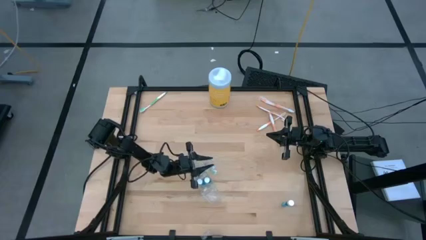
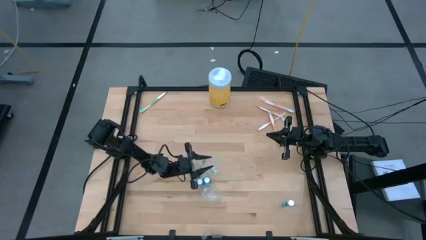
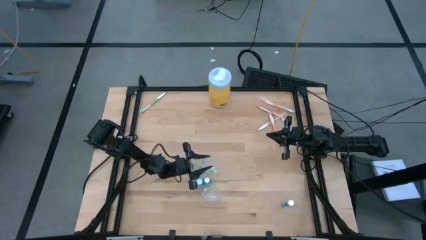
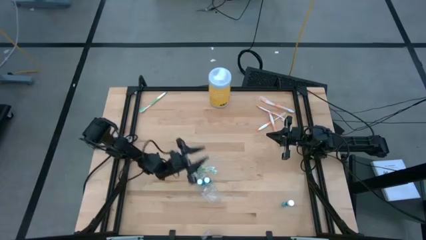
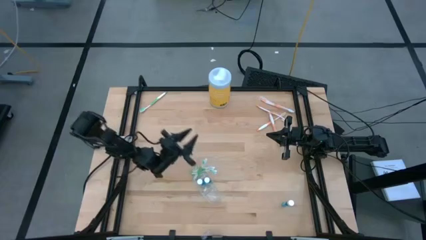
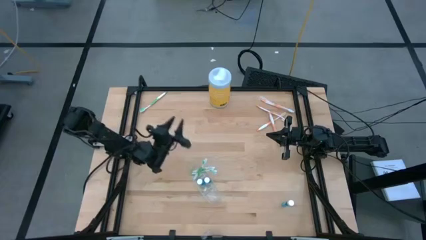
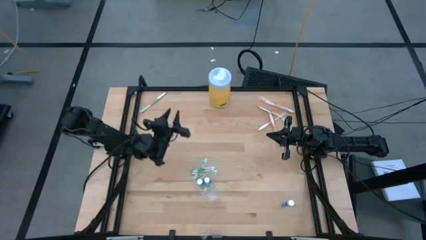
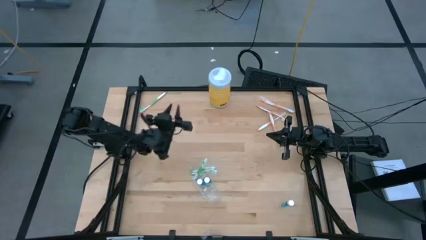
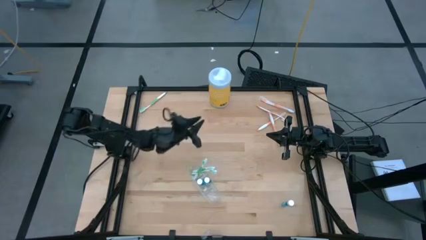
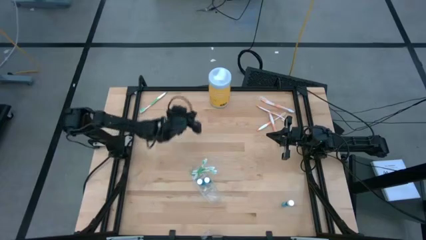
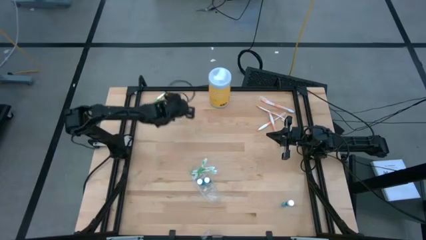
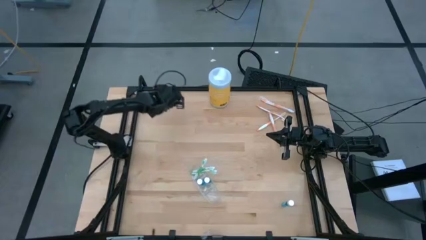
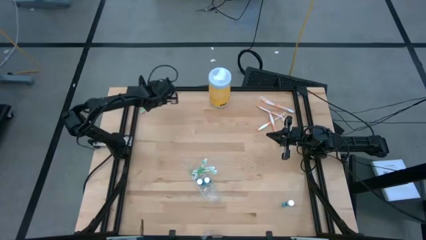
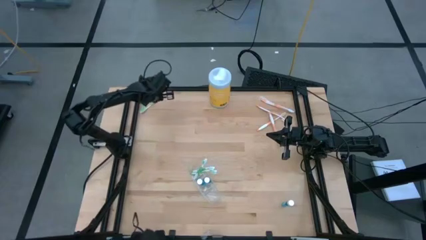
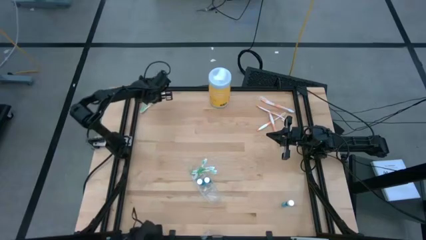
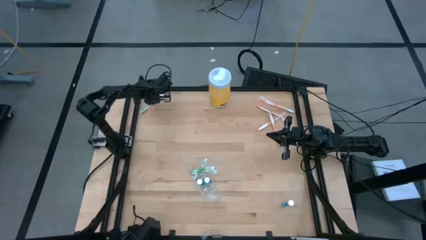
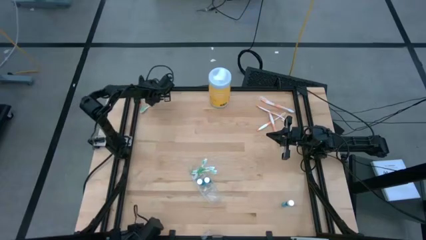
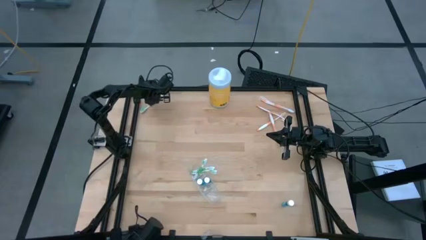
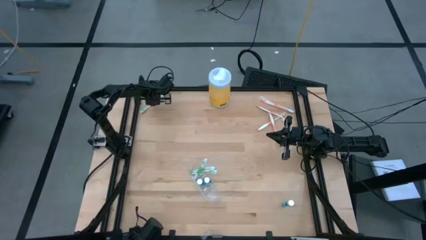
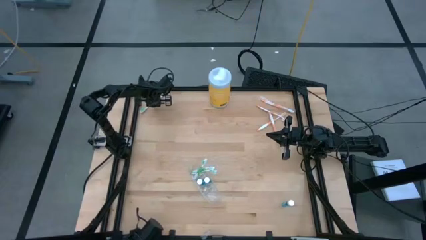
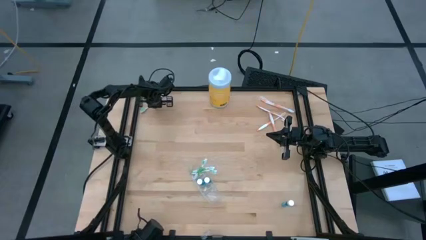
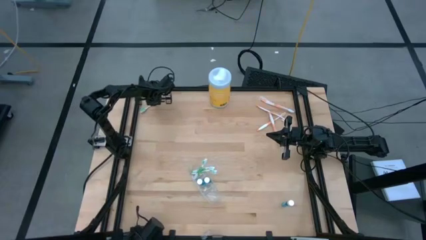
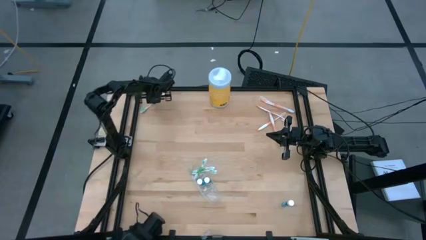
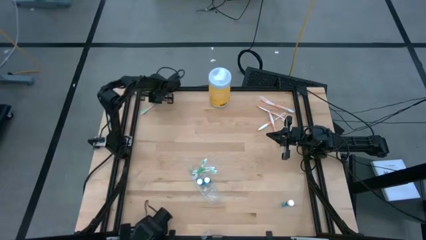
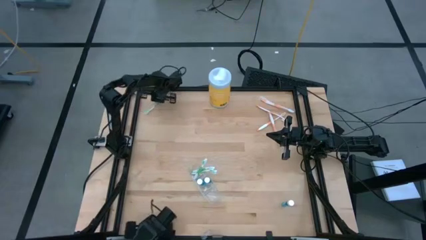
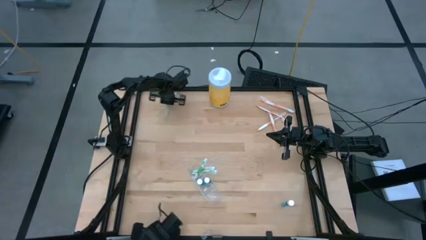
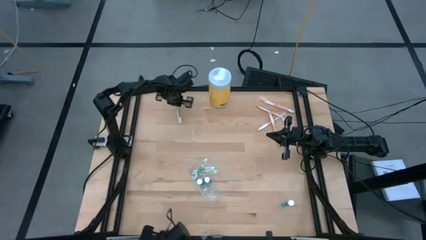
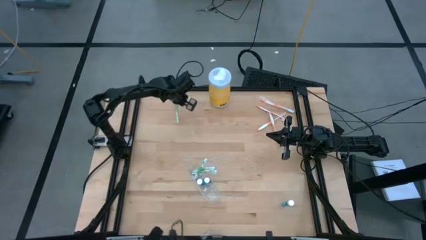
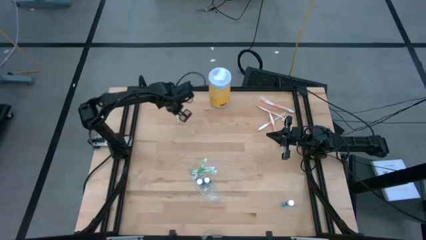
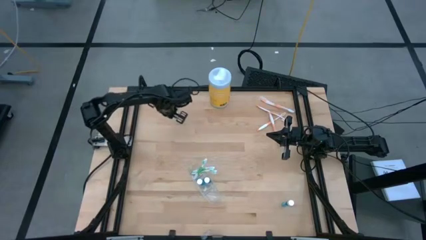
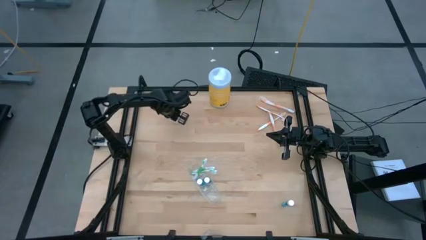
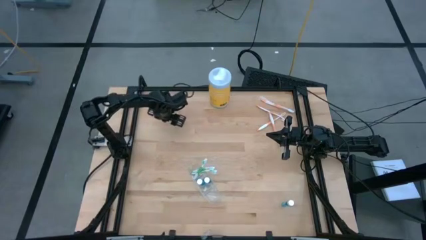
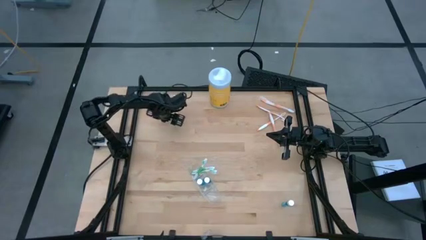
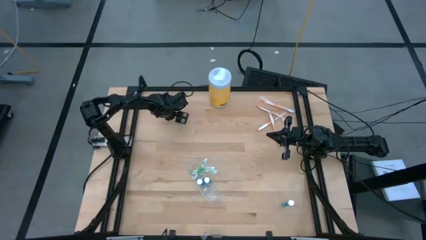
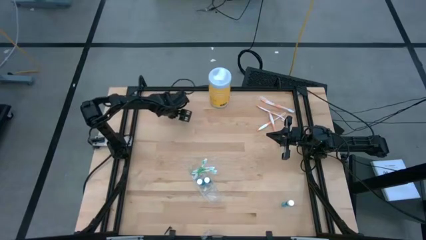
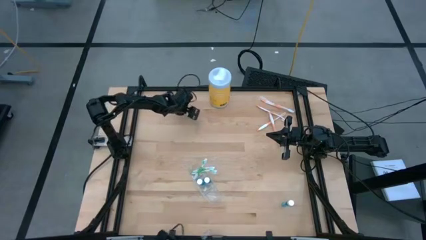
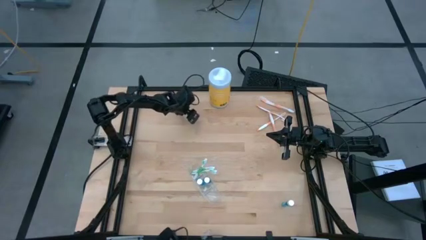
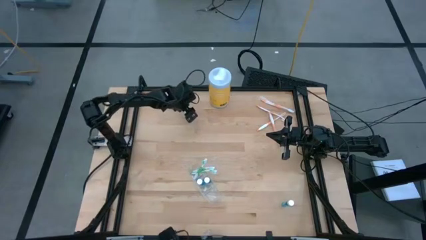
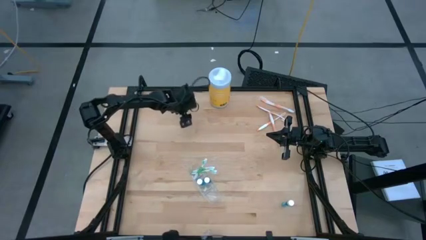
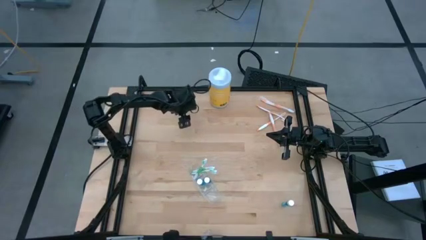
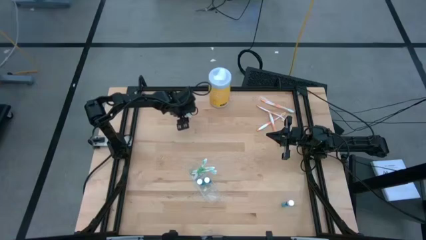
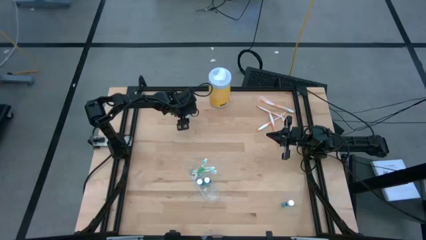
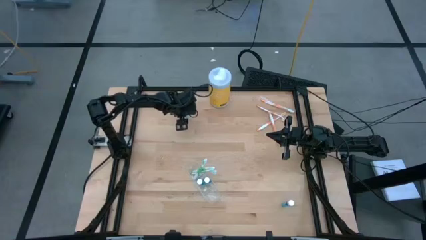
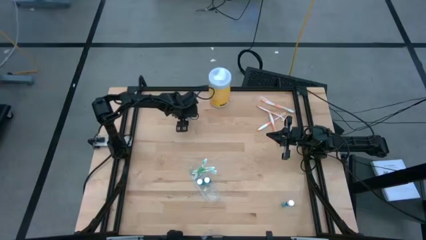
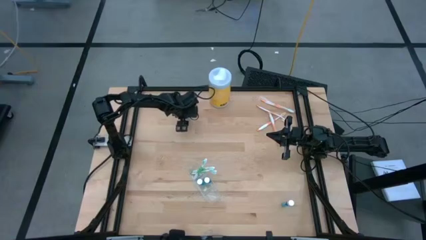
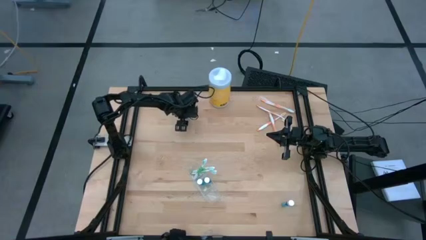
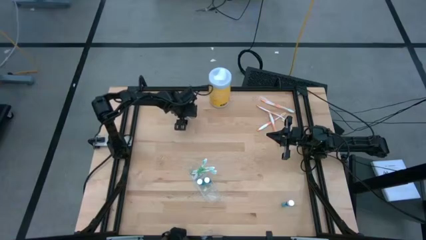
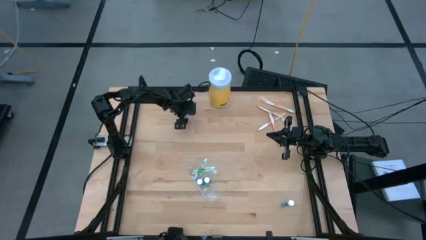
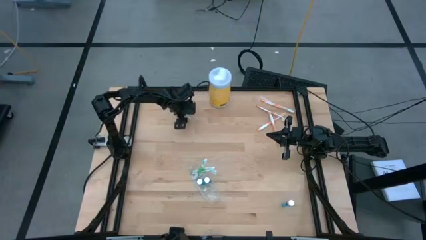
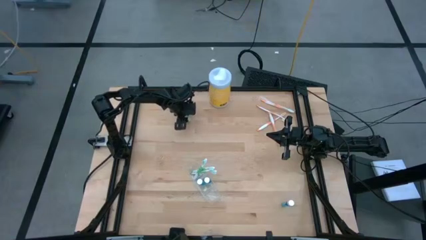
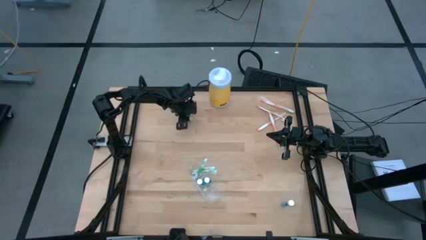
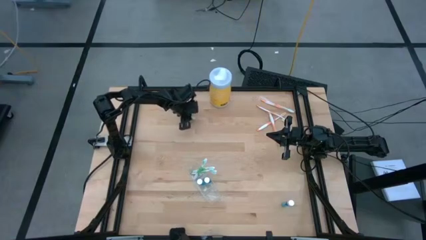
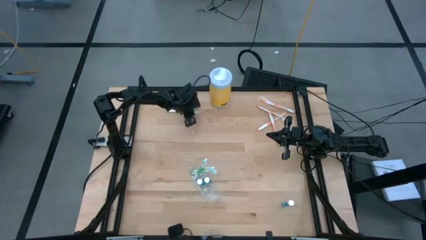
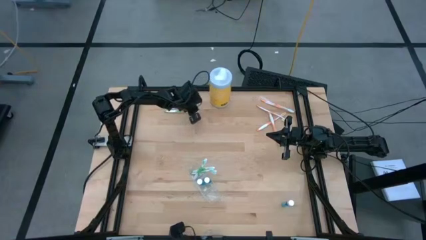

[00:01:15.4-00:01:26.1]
Task: Pick & Place toothbrushing station
Put the green toothbrush into the transparent organizer

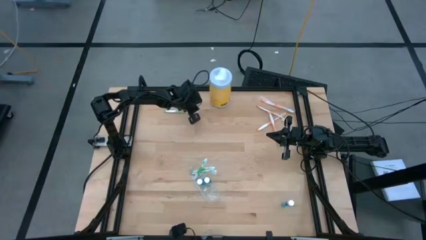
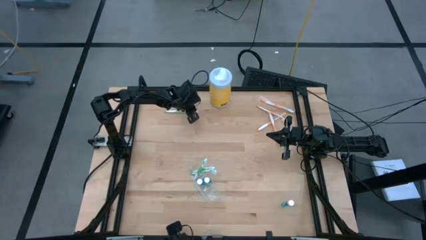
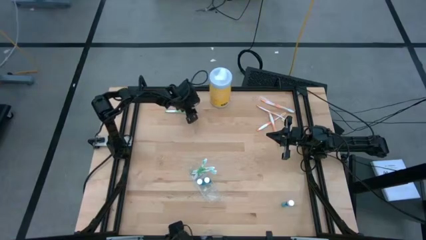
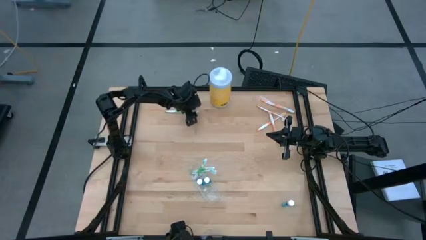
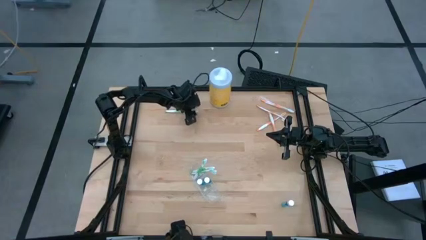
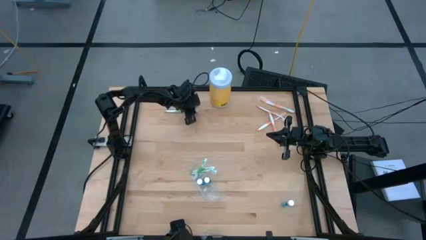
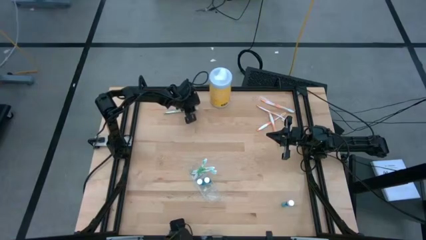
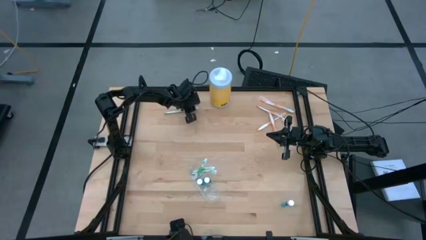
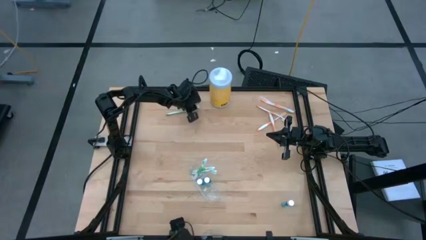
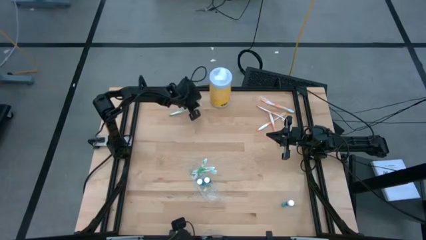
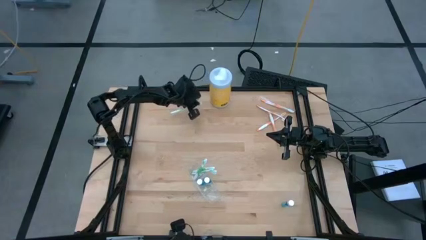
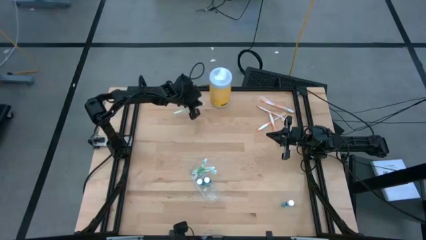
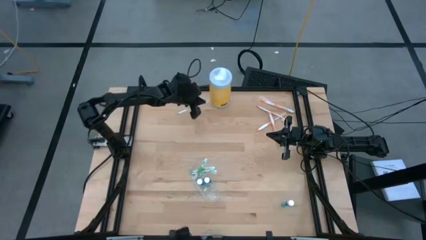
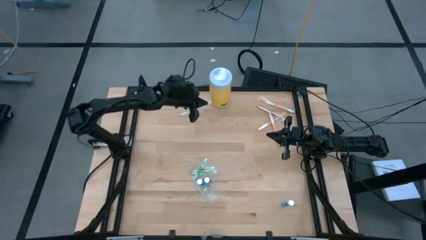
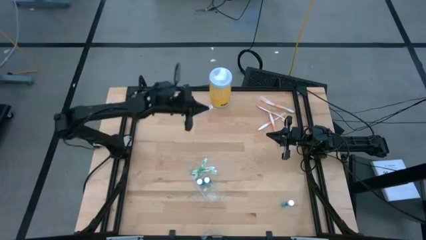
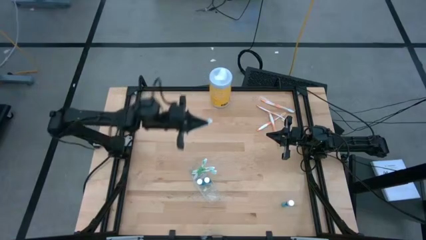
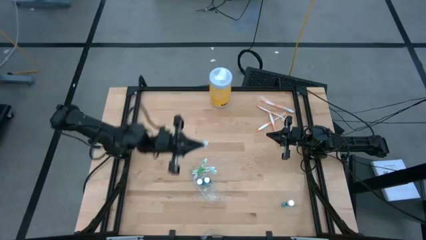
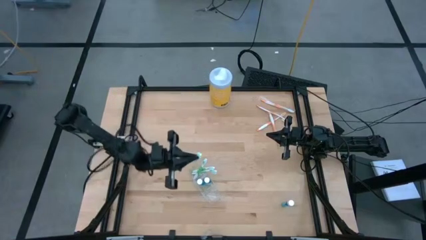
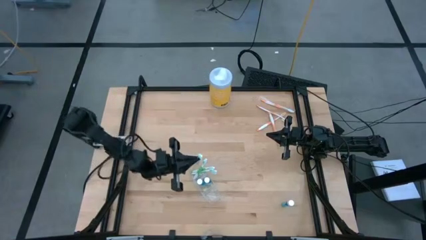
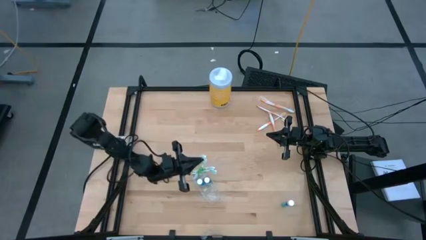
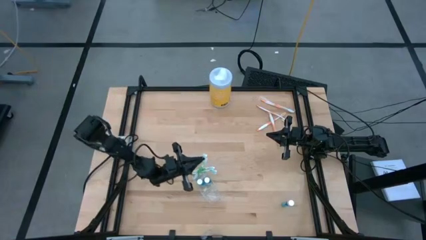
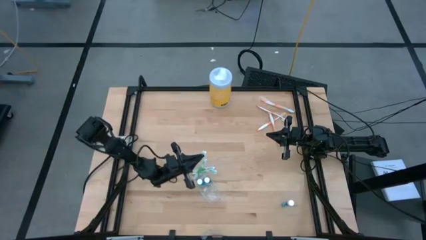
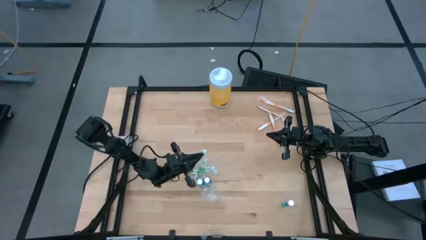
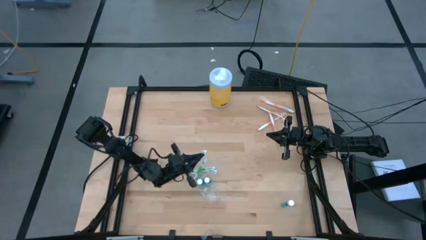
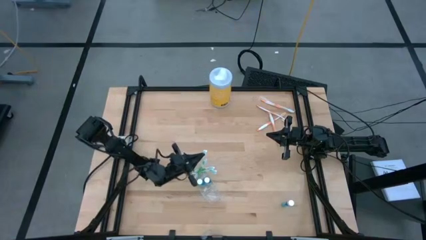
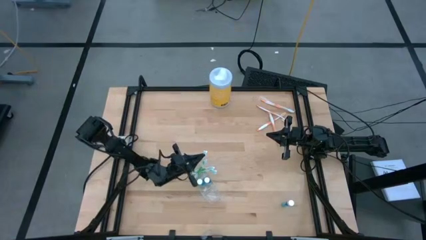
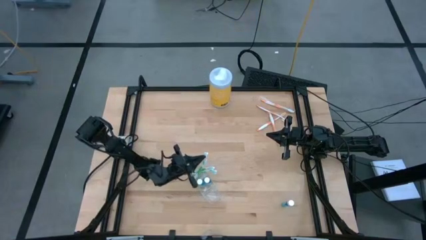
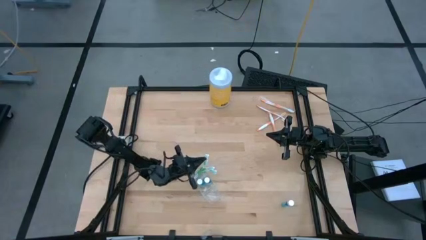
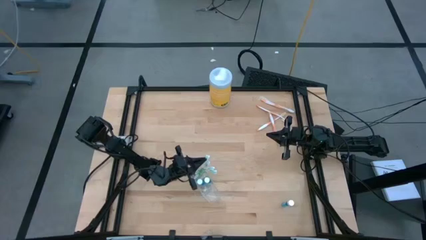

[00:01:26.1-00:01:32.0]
Put the green toothbrush into the transparent organizer
